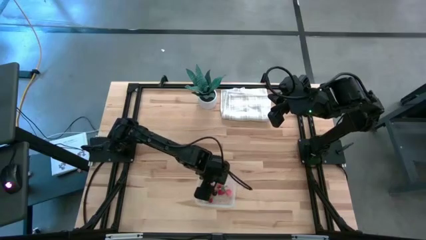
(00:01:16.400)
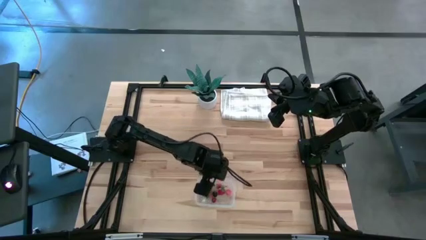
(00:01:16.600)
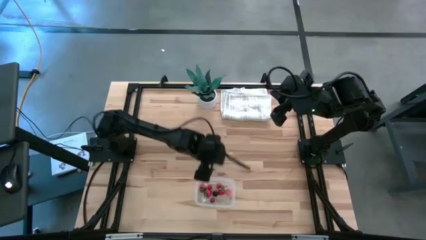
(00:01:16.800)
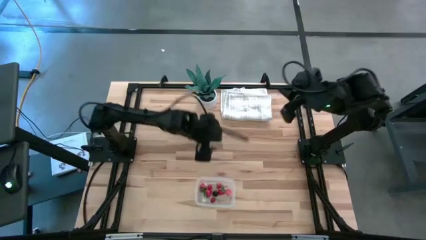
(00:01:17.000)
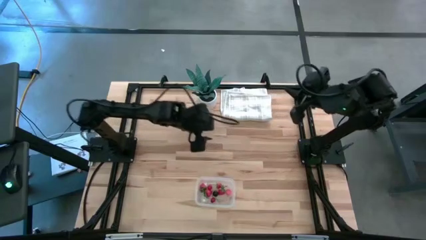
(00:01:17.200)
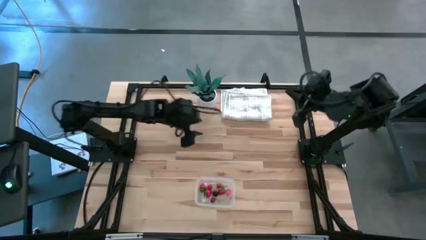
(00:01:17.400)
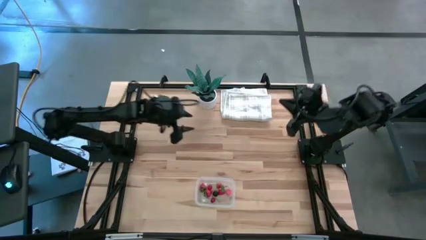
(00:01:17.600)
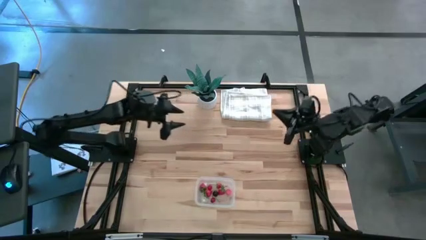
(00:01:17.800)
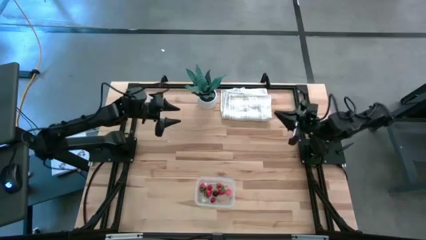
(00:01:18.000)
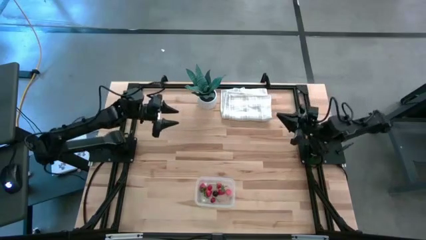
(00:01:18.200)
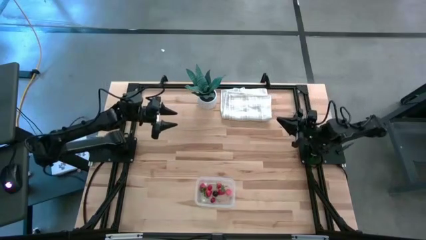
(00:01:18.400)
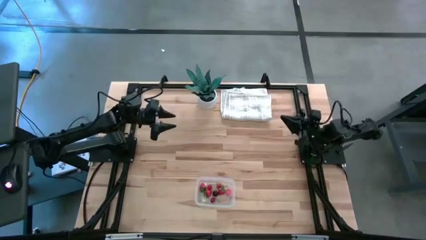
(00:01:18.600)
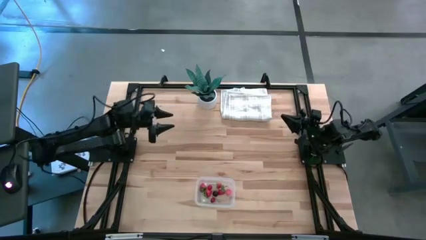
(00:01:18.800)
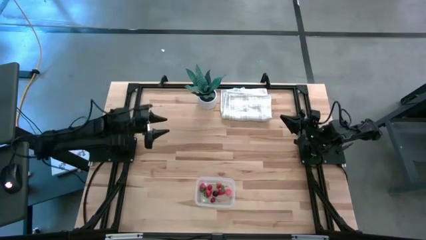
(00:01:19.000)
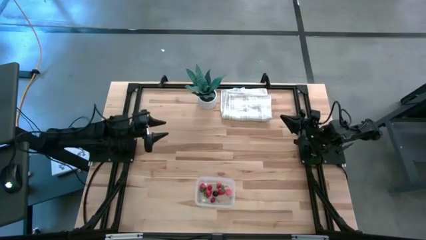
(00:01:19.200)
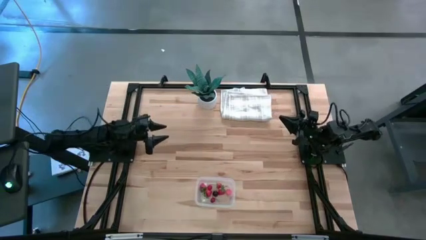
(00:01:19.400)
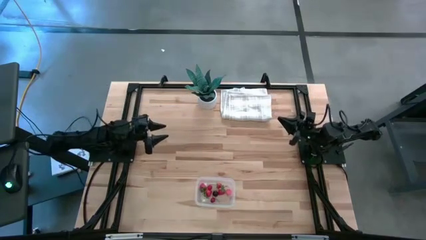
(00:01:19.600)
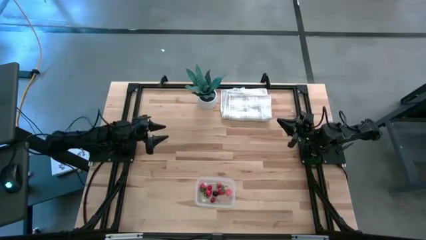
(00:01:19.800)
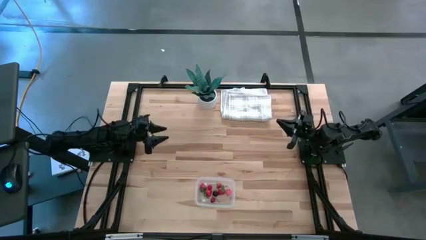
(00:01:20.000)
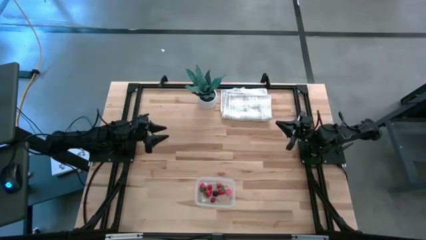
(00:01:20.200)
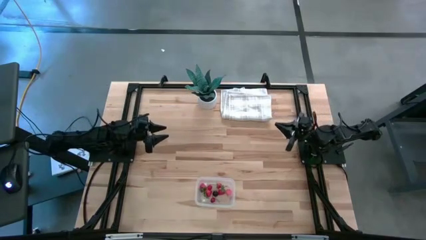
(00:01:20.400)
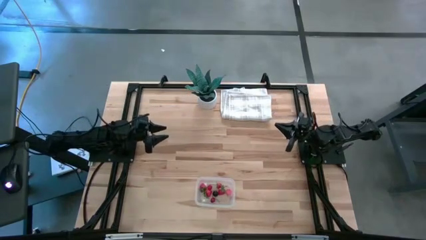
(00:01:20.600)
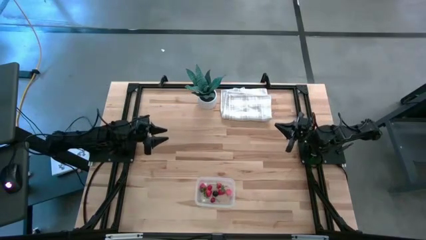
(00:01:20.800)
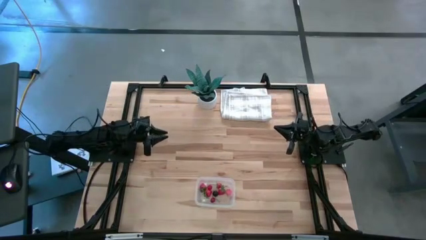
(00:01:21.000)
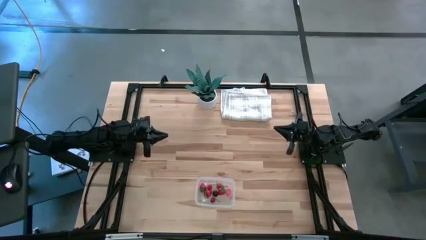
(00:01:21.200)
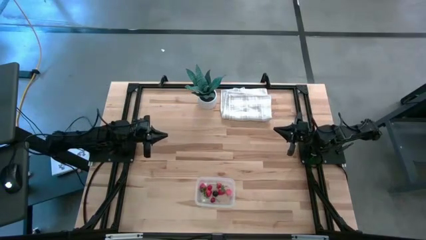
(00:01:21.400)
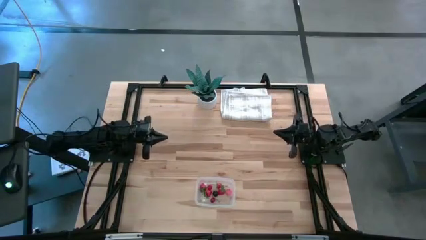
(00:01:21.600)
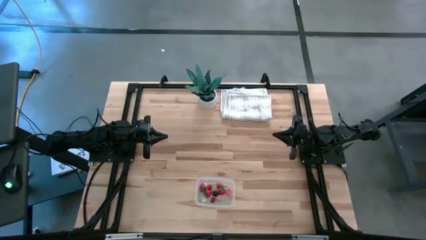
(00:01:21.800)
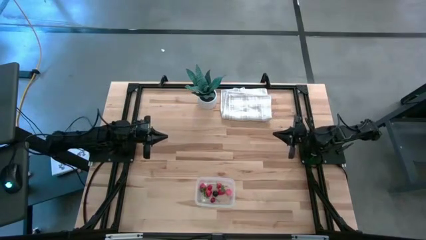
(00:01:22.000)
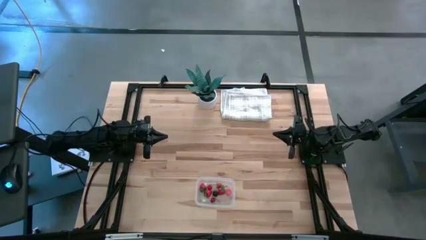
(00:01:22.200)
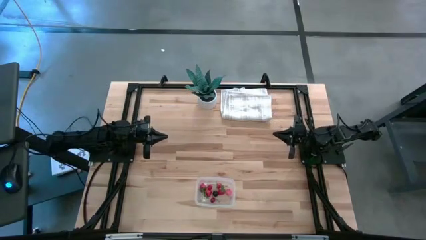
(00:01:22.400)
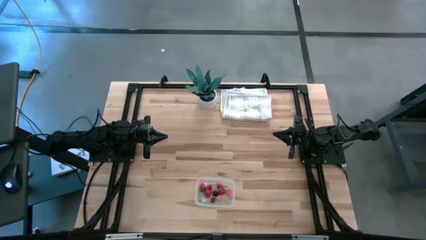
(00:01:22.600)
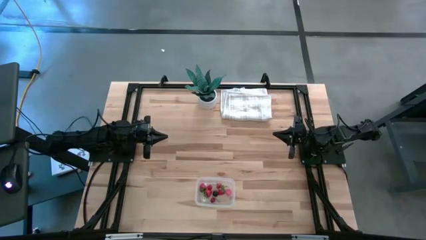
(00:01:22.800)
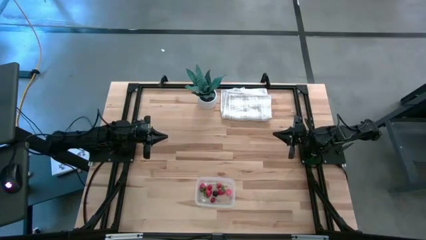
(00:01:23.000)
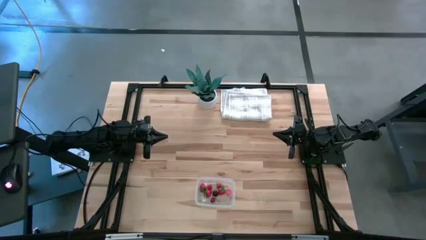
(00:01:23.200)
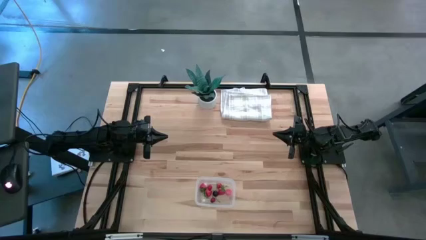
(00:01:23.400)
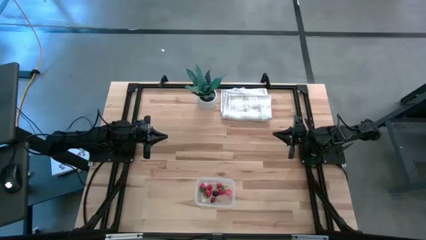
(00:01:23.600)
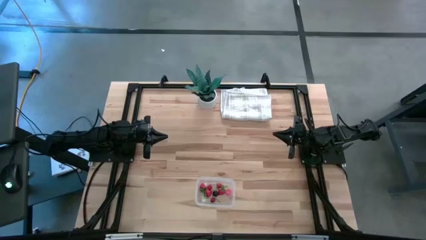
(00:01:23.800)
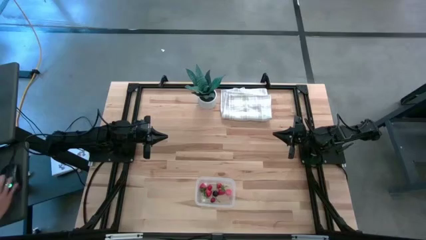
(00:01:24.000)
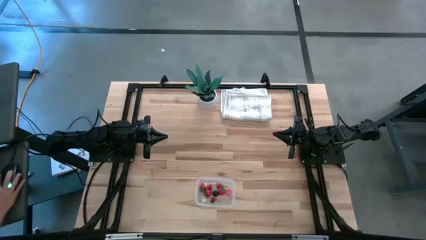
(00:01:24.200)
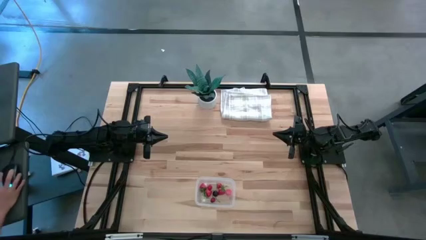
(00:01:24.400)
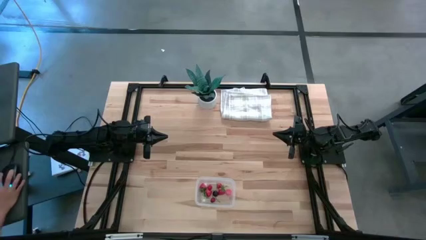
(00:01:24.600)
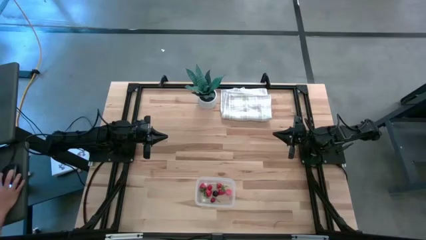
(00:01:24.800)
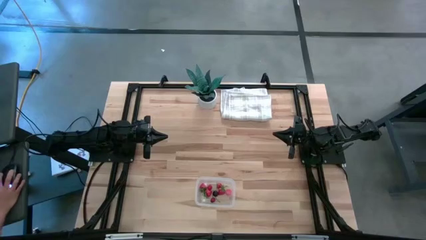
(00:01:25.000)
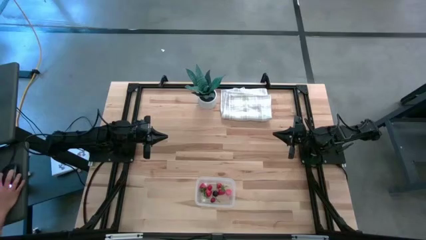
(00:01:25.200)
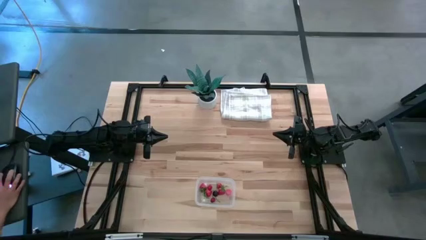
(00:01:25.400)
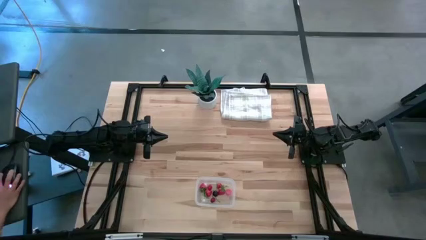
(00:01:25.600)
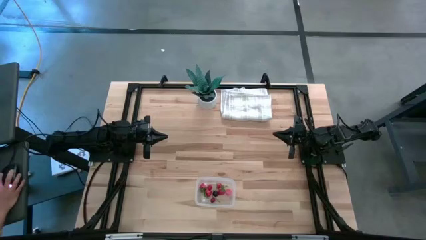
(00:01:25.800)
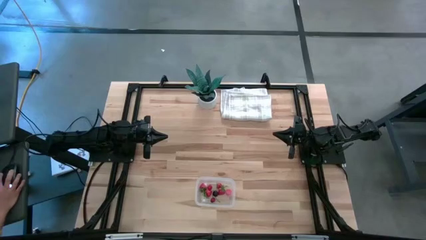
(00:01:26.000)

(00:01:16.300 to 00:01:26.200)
Task: Pick and placing Produce into tupperware
Return to Home Position
